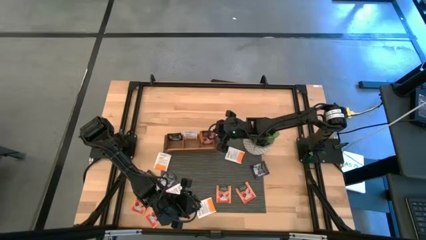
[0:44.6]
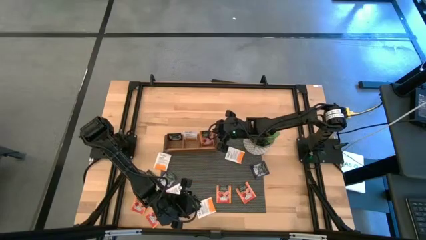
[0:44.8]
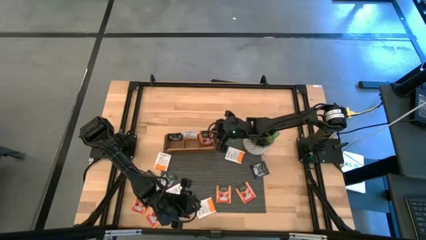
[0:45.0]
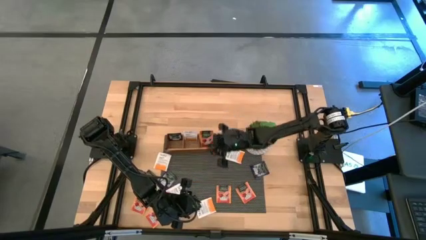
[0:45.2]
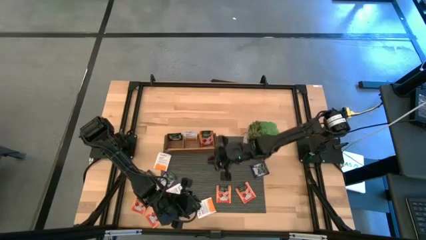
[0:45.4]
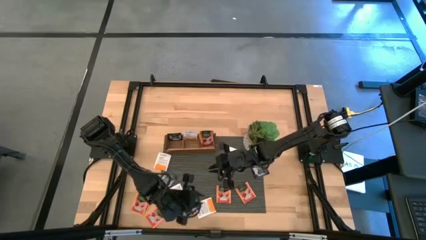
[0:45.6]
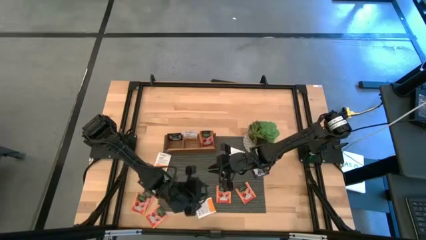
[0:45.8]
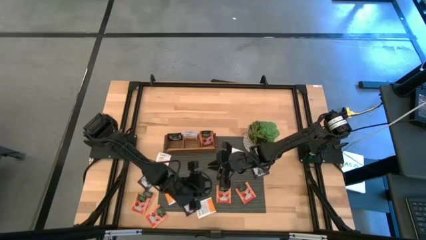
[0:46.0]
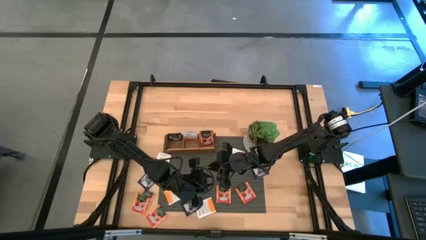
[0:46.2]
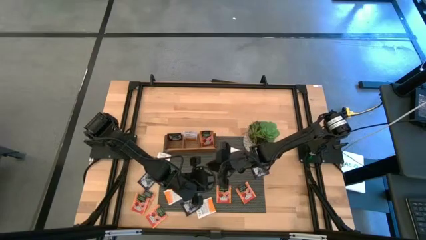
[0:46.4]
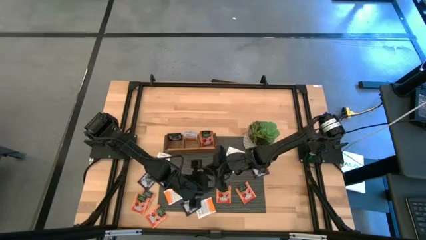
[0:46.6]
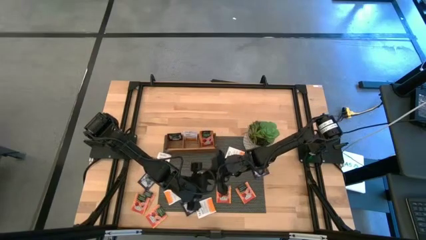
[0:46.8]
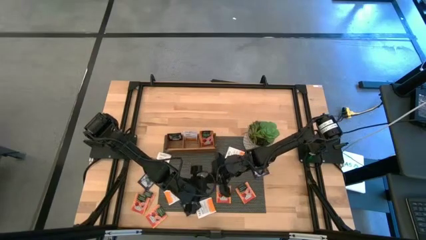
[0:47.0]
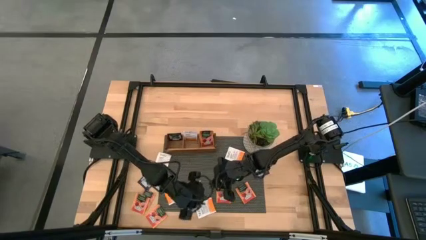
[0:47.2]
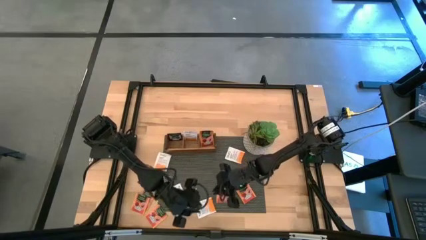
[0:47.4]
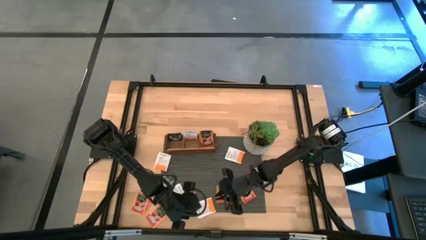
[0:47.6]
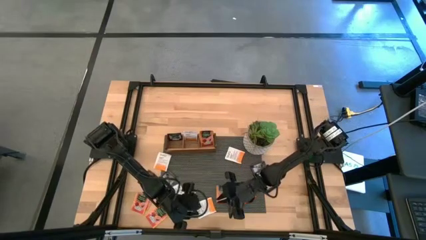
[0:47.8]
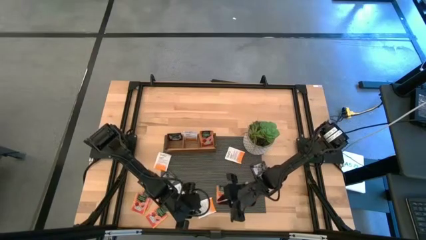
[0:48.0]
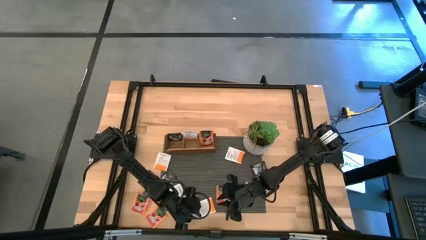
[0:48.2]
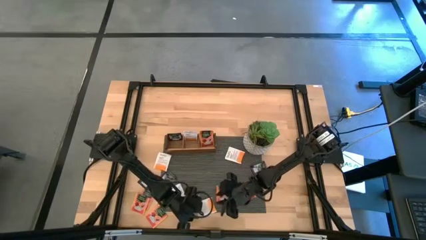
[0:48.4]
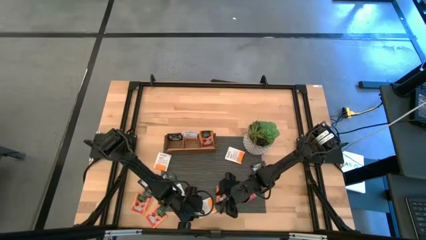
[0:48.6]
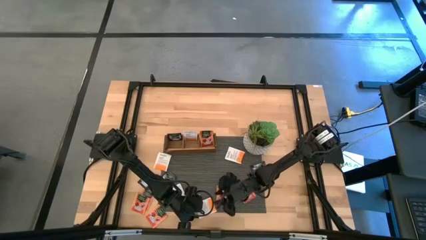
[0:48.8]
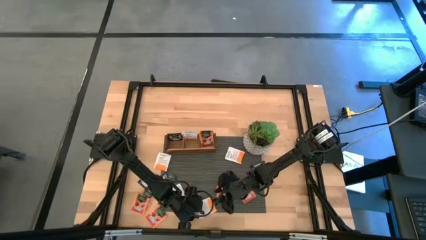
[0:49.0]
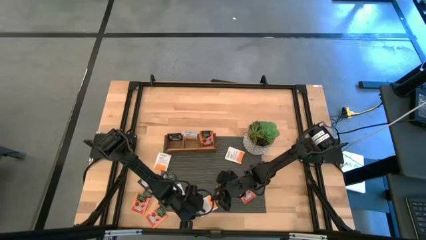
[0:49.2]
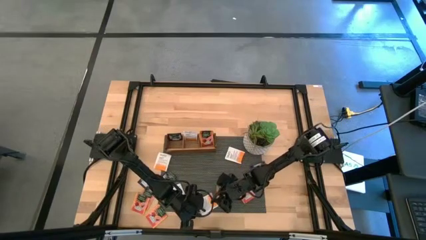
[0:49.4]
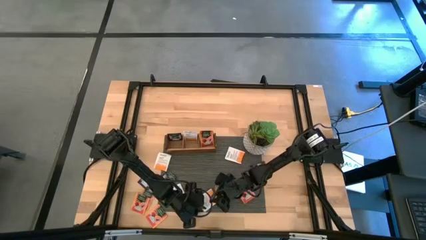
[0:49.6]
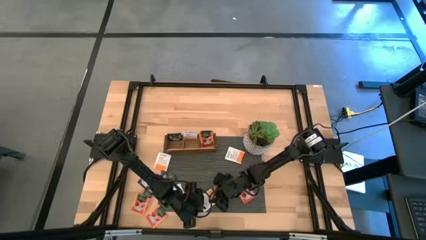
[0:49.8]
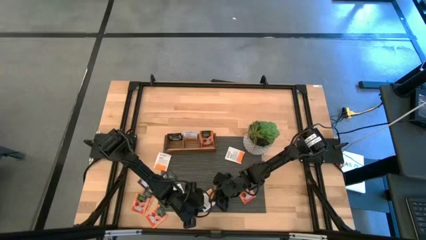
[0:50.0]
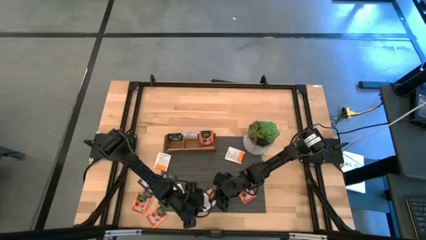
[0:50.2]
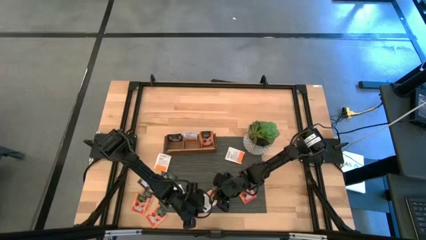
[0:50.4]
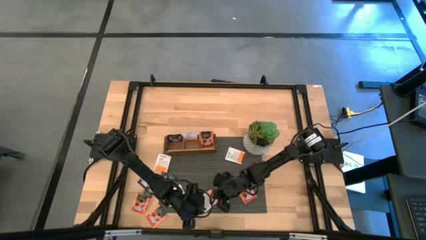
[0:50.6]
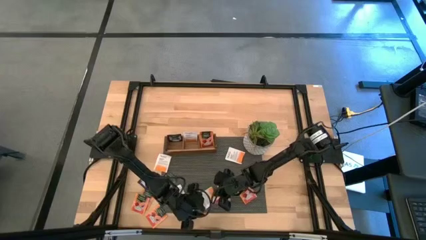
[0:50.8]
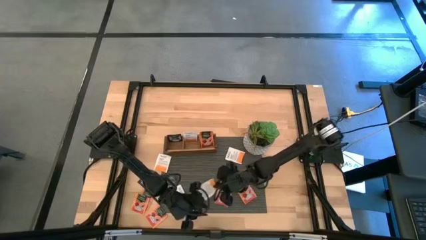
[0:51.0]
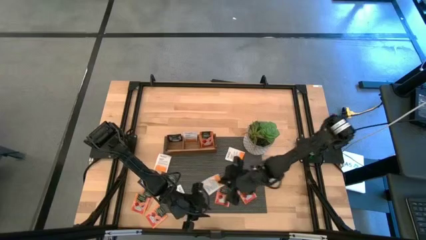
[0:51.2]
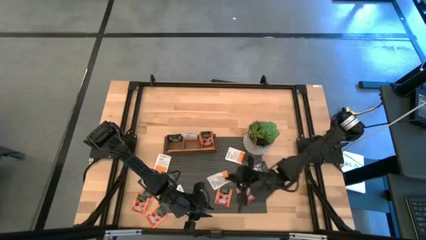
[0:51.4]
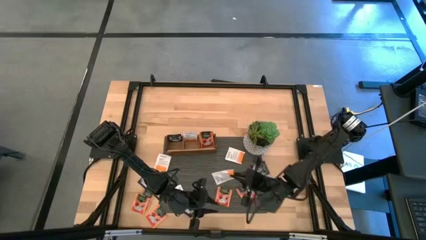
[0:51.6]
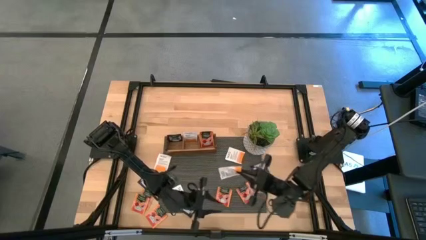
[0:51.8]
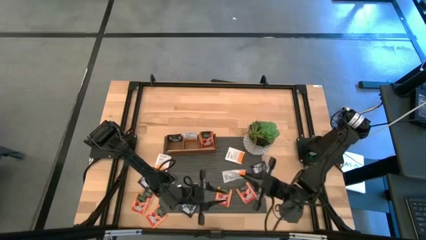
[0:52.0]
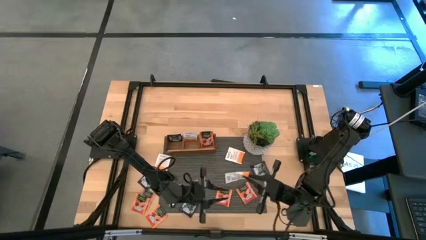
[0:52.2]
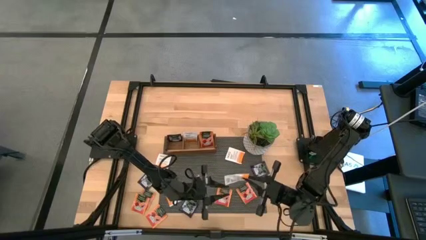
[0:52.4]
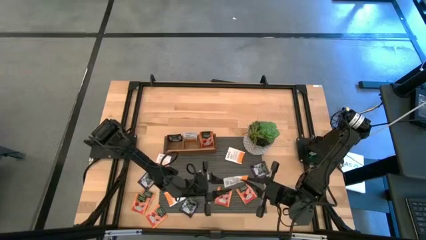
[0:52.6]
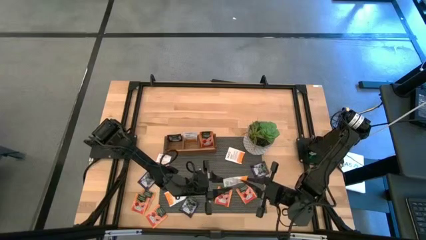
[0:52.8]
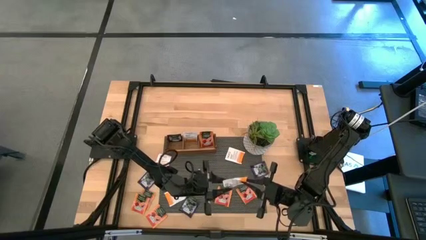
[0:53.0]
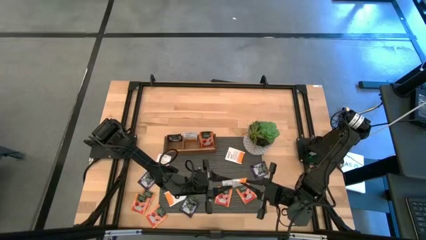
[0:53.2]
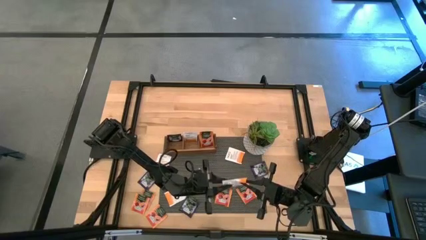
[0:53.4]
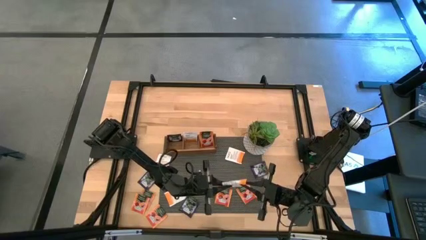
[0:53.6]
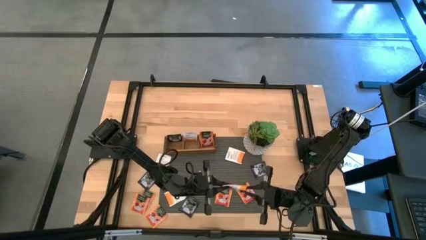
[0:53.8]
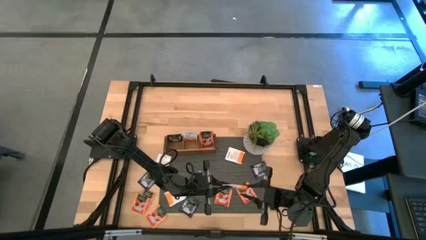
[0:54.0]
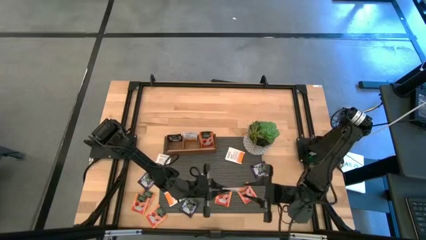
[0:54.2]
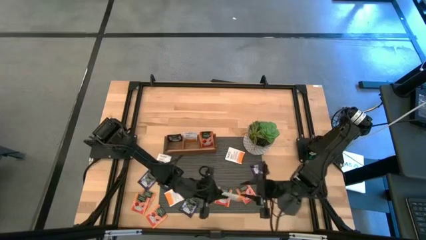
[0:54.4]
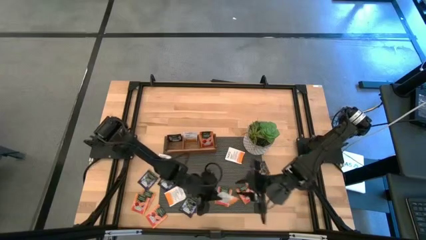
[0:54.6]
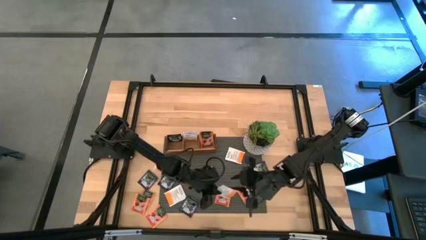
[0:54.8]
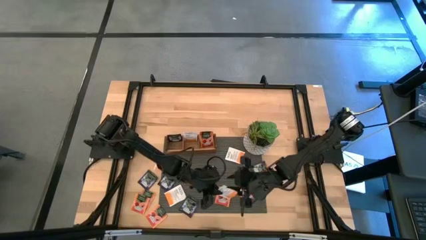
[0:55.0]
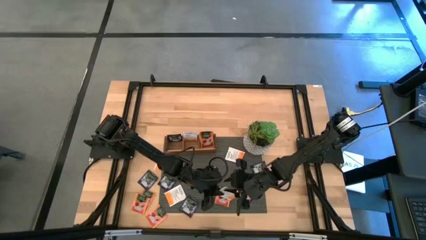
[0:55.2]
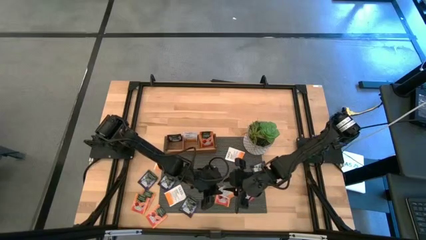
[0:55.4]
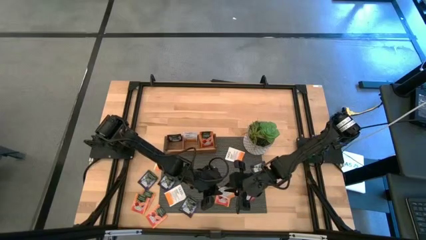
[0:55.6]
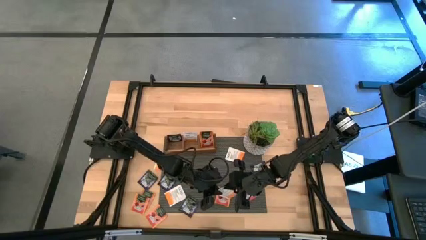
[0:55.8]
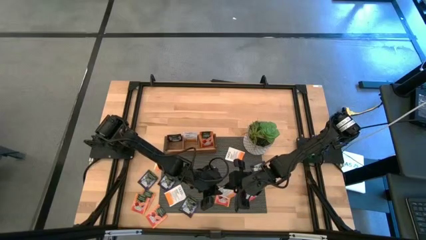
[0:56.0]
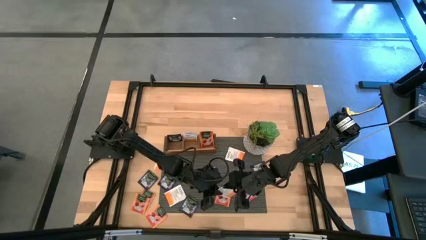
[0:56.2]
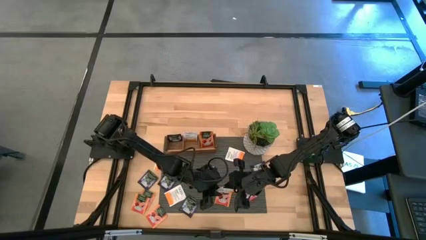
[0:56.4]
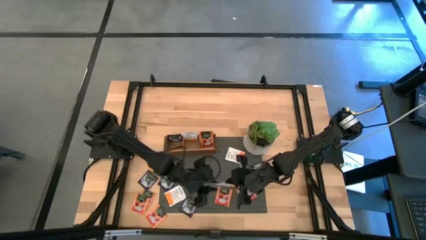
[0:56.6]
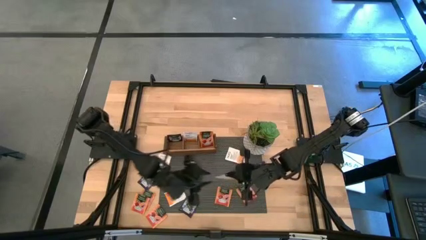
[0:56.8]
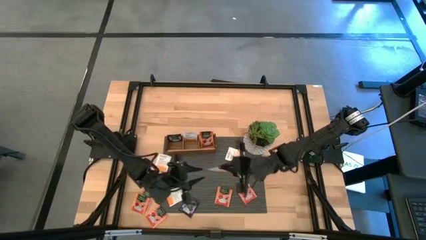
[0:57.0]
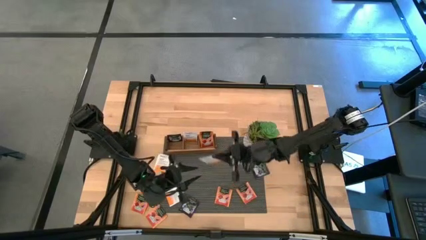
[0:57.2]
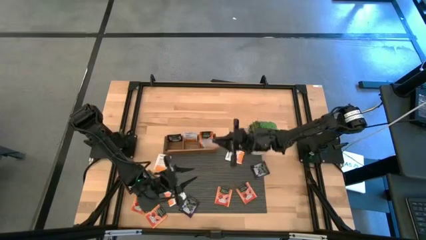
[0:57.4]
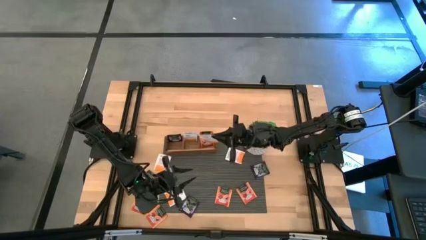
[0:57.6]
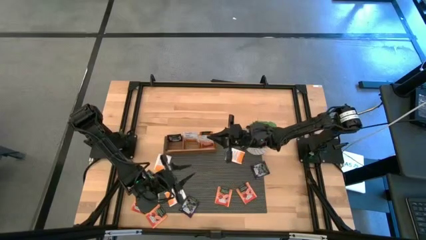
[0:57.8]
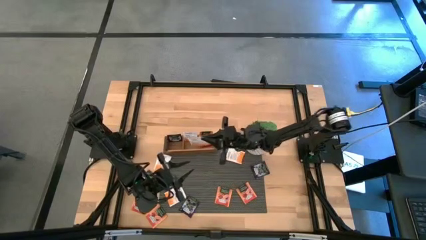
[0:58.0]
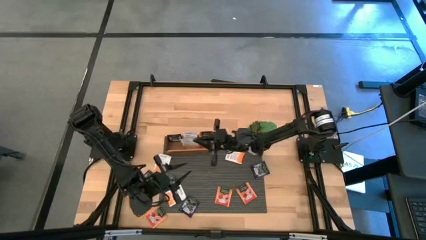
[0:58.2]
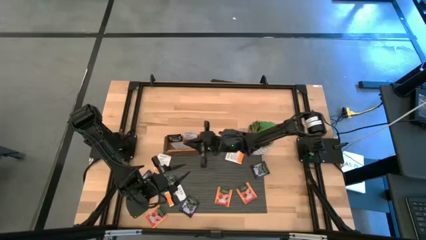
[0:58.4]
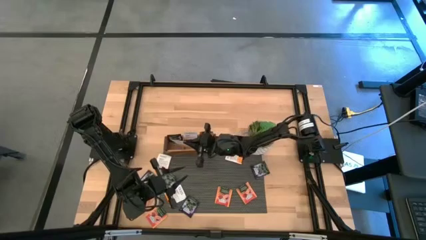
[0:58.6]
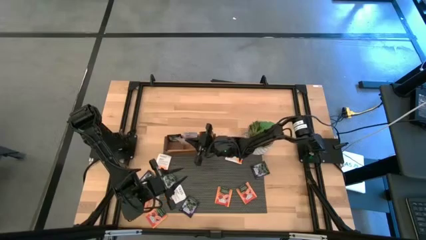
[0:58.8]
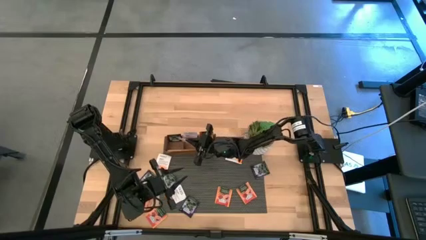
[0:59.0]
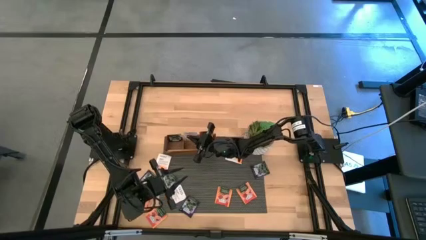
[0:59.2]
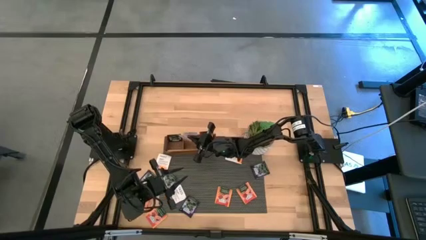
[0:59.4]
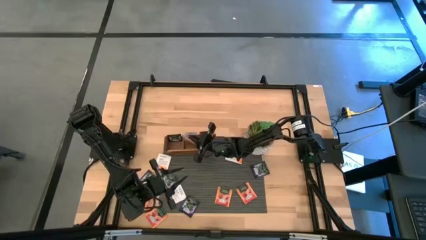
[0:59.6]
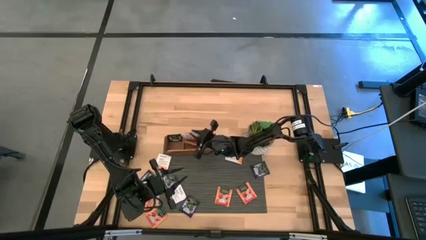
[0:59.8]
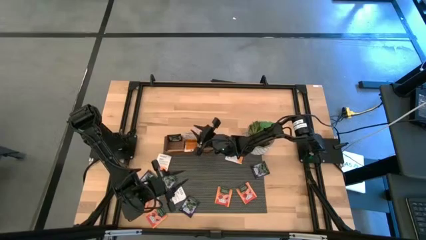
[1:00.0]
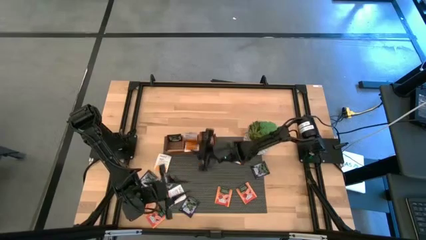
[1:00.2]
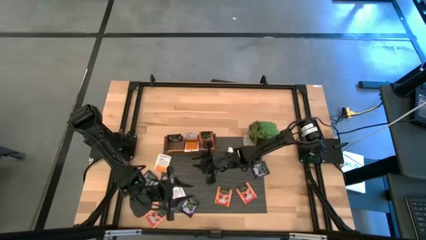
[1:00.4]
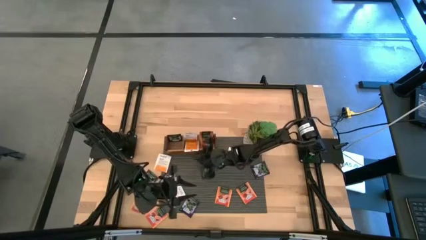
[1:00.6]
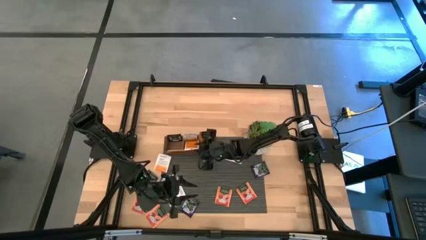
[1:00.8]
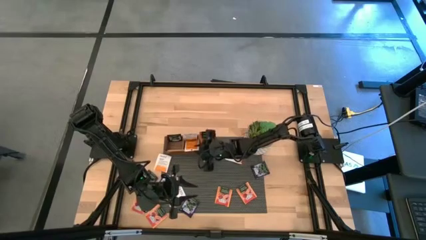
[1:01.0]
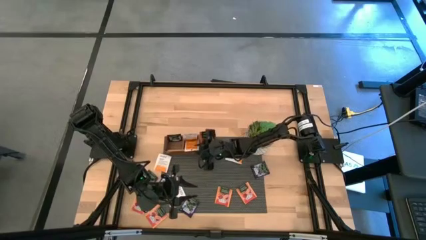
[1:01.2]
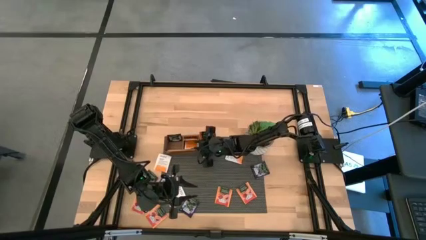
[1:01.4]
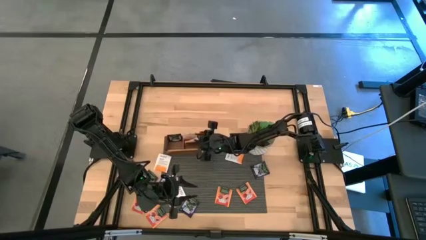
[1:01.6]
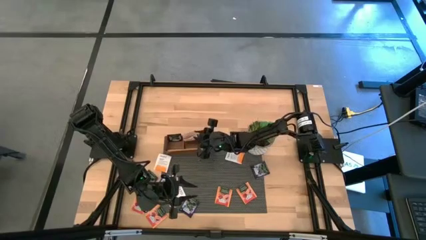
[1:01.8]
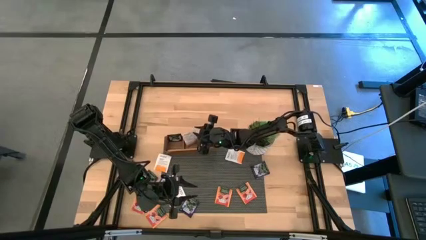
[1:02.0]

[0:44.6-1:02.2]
Task: Pick & Place Tea
Put the white tea bag to the middle section of the wooden organizer
